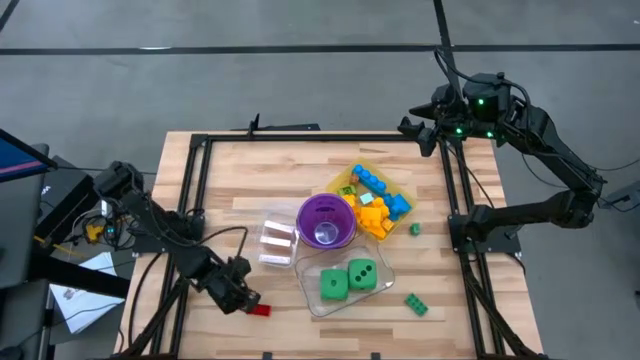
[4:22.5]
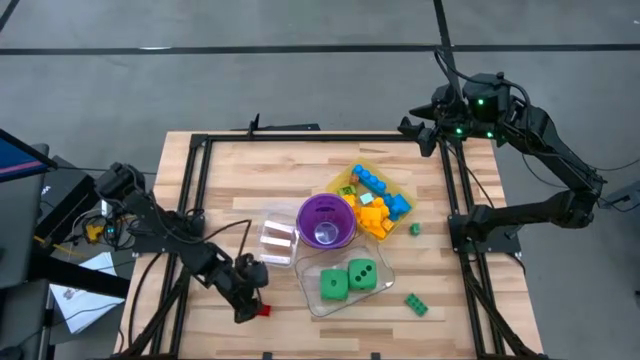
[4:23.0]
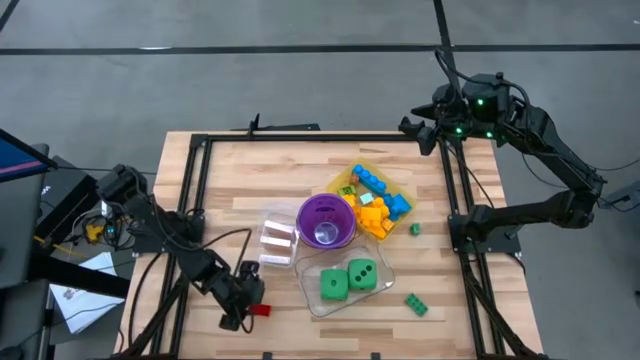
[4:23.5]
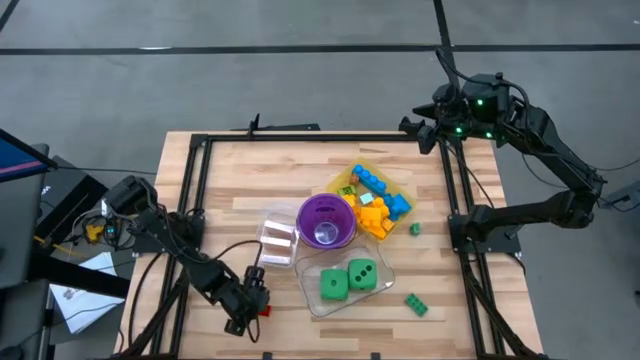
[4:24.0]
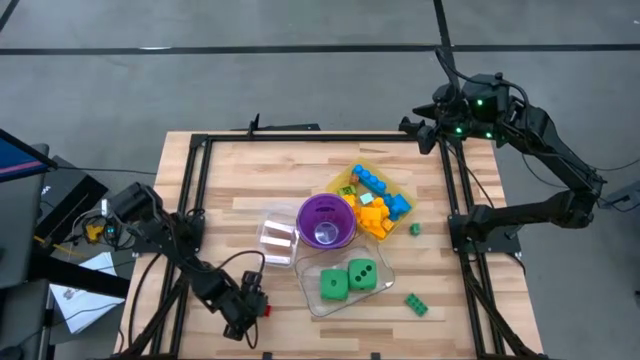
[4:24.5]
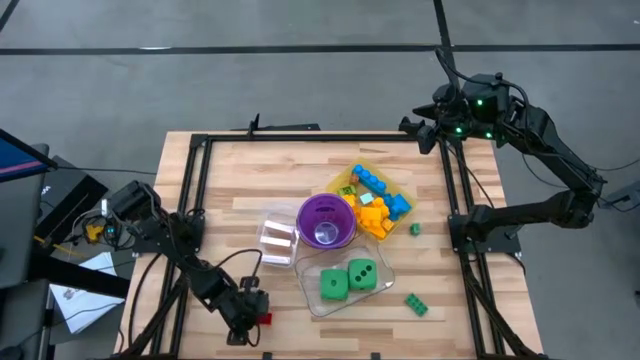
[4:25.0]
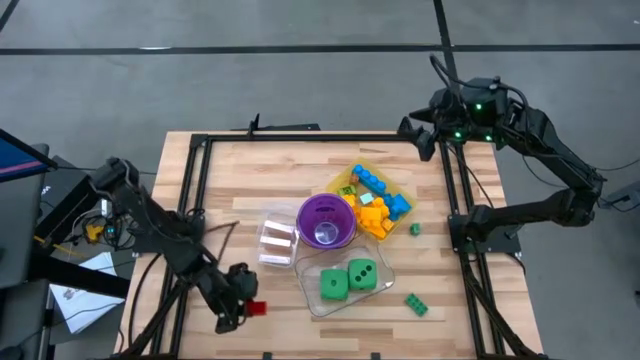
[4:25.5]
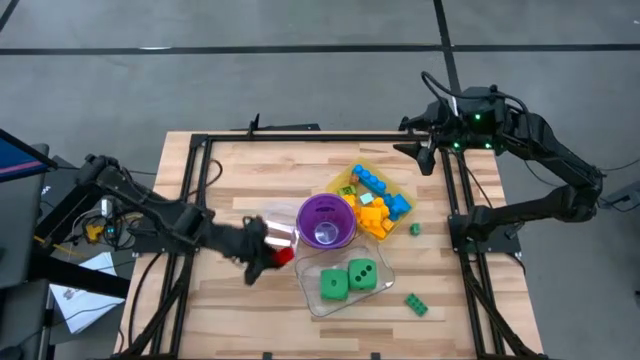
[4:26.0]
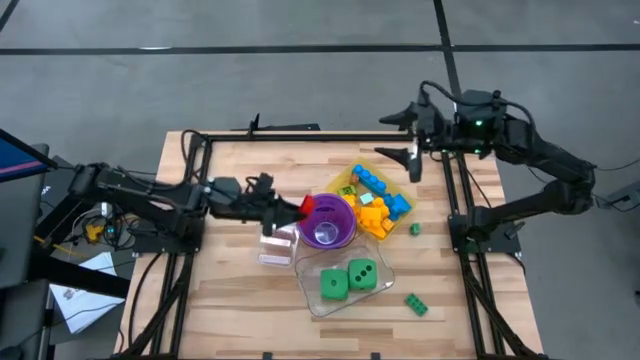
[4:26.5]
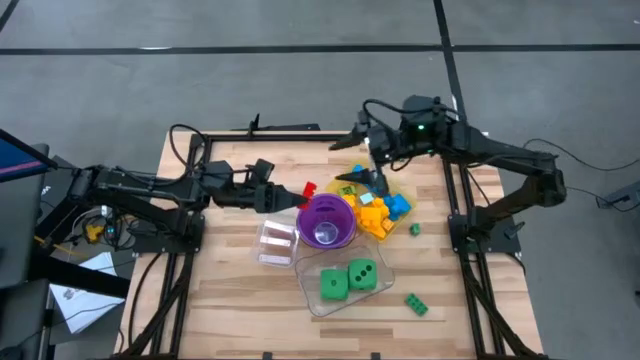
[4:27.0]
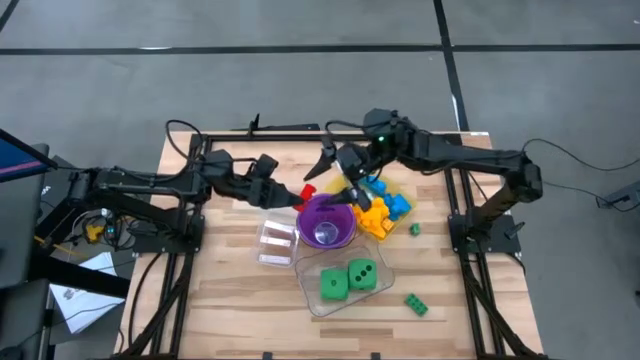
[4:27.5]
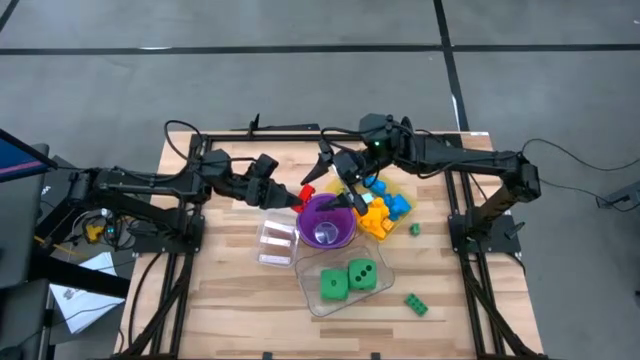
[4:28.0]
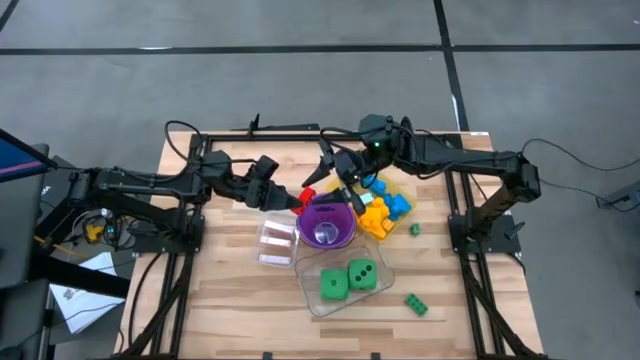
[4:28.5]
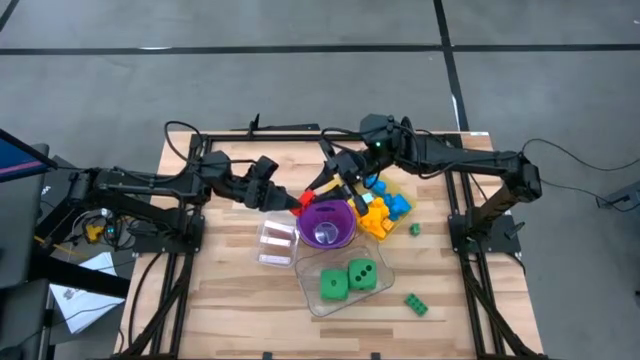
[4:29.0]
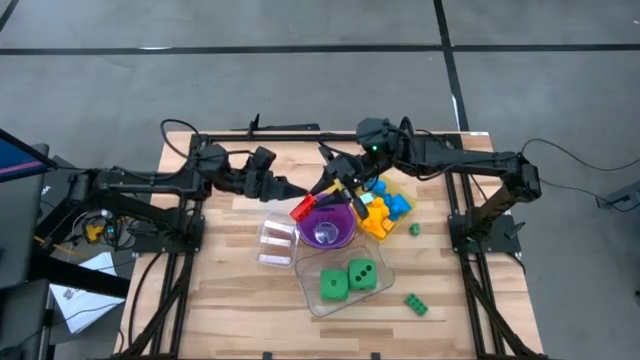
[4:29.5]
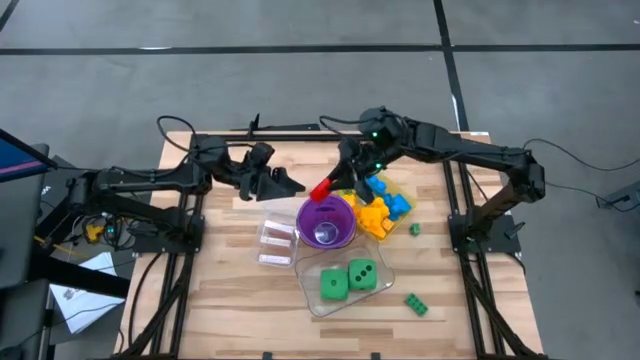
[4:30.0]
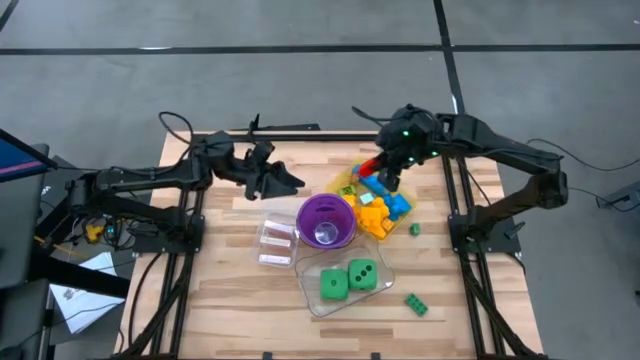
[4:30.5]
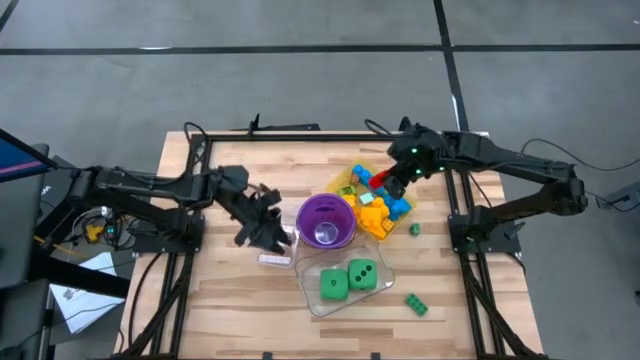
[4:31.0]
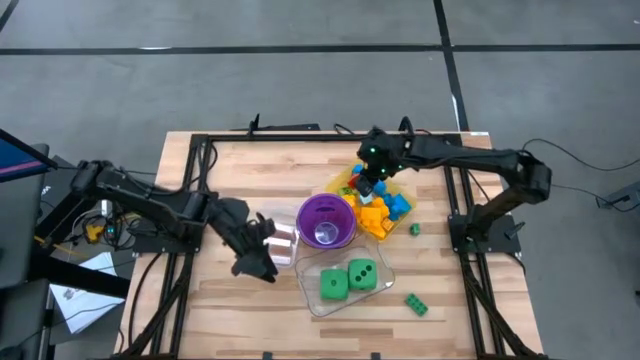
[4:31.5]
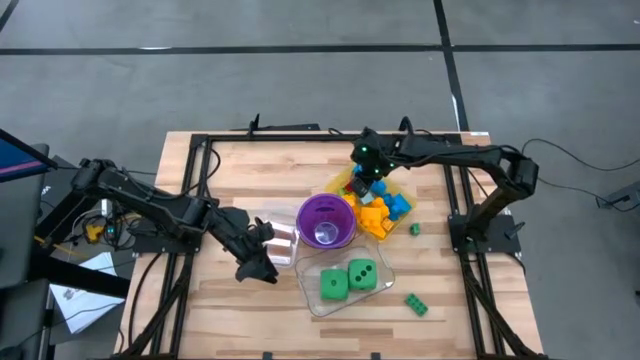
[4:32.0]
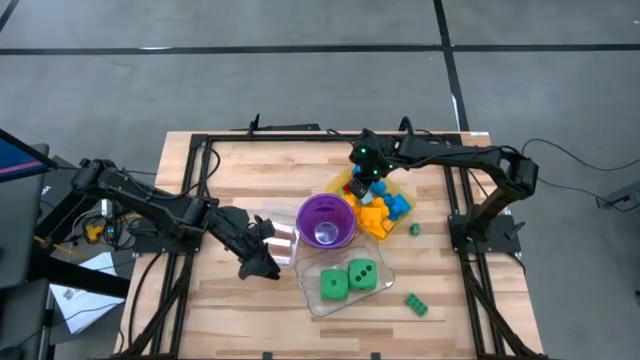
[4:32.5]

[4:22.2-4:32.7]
Task: Pick & Place Toys
Put the red game piece into the yellow bin

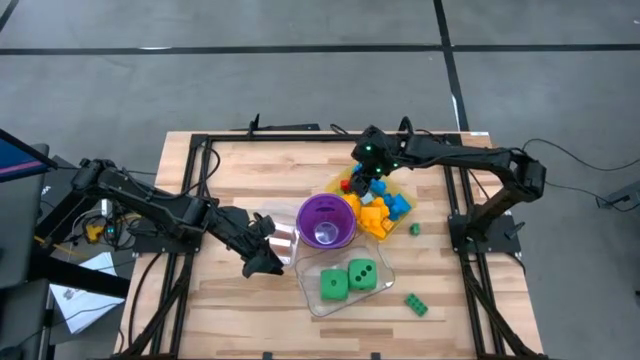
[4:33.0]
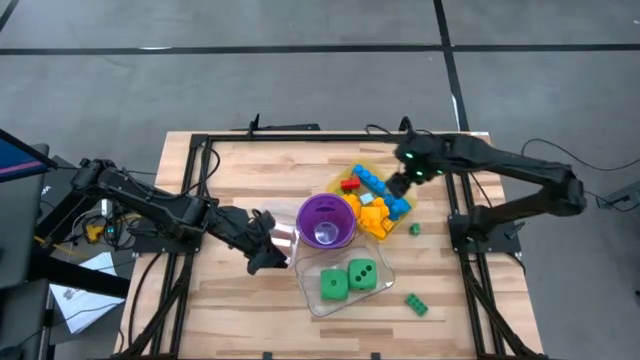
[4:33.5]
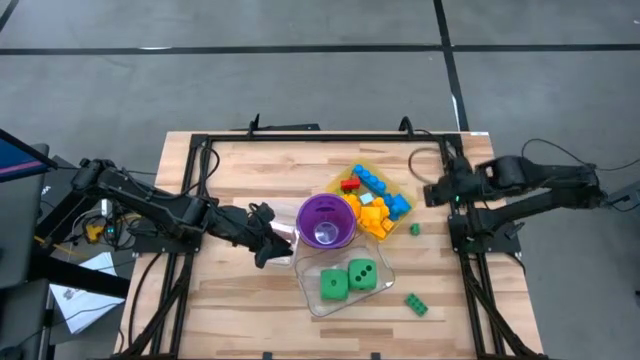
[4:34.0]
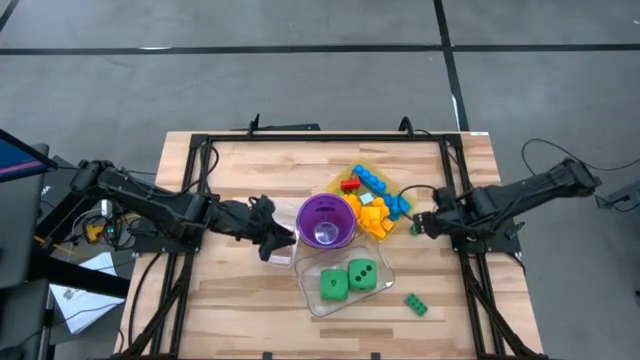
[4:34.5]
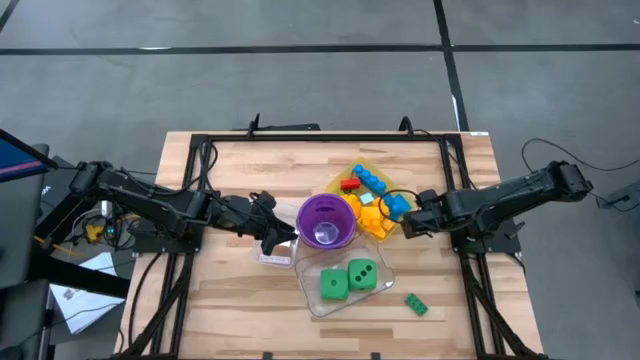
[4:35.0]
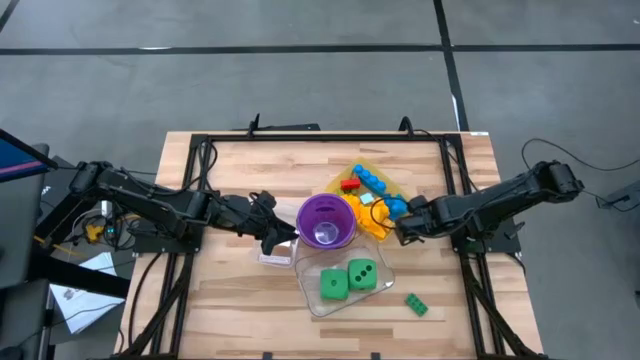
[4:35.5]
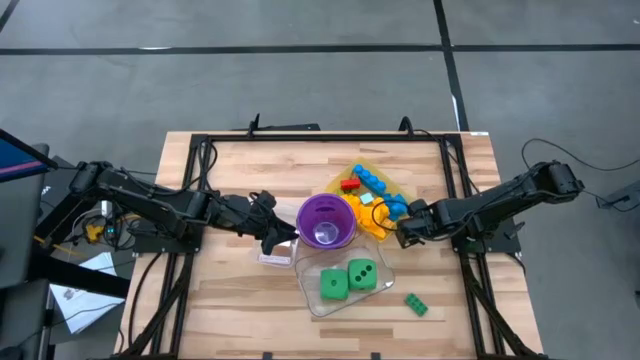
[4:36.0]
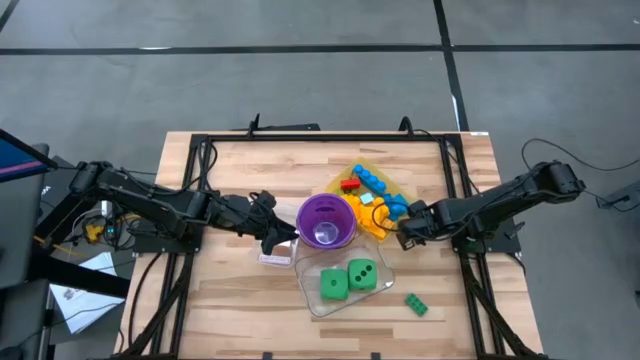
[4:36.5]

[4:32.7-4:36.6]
Put the green game piece into the yellow bin

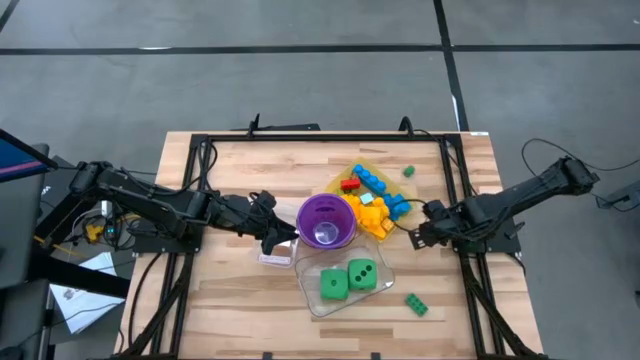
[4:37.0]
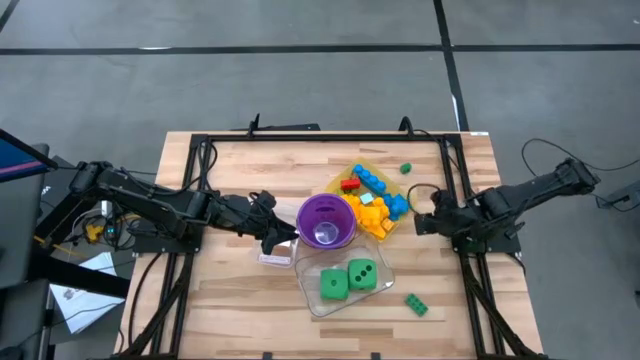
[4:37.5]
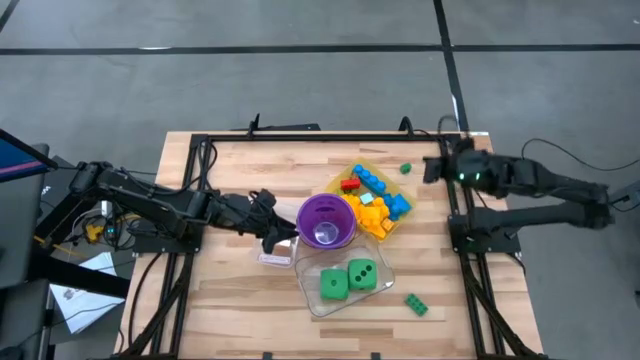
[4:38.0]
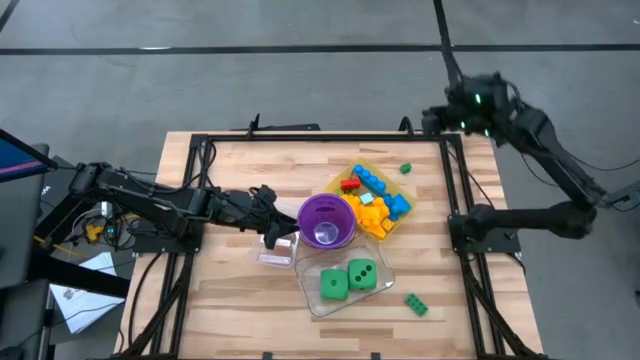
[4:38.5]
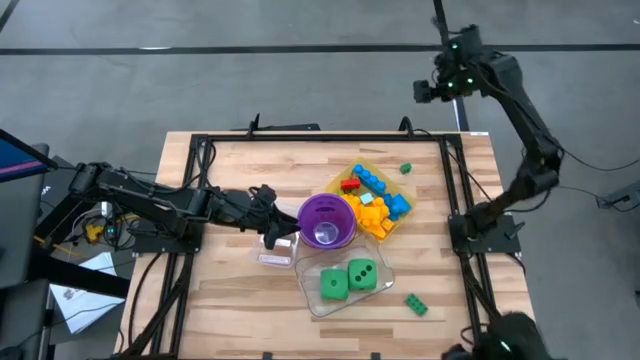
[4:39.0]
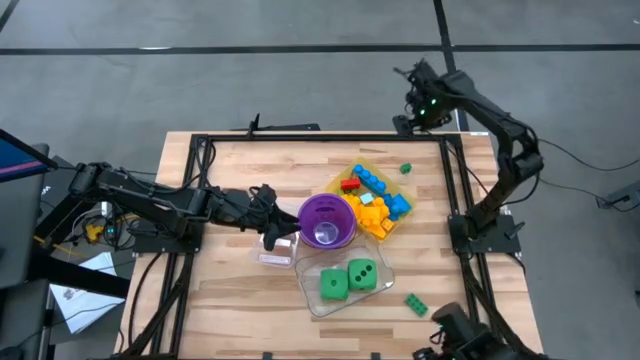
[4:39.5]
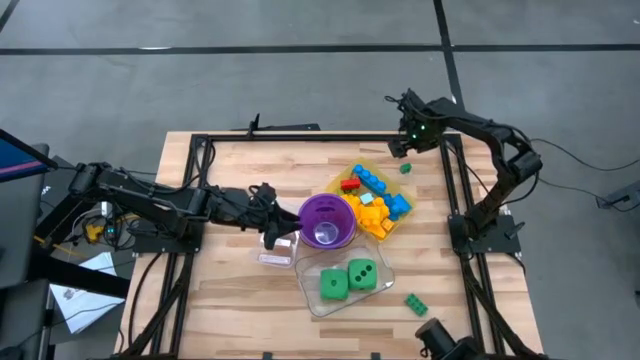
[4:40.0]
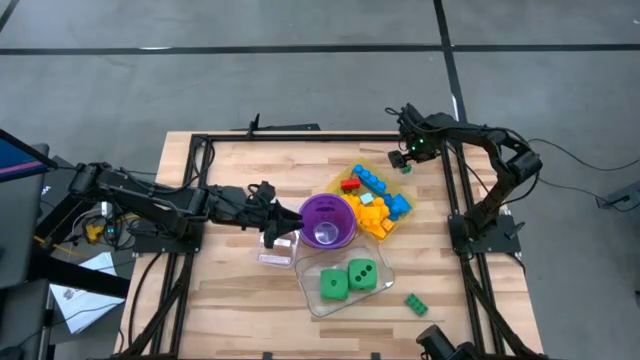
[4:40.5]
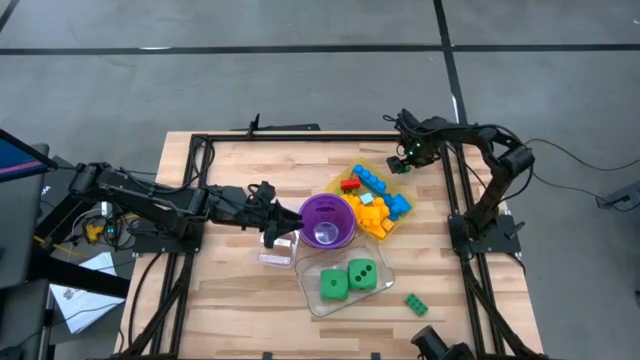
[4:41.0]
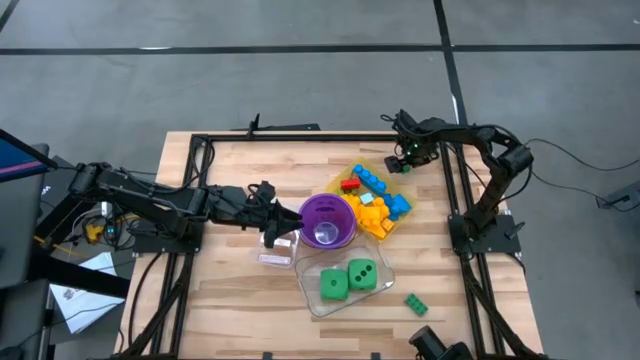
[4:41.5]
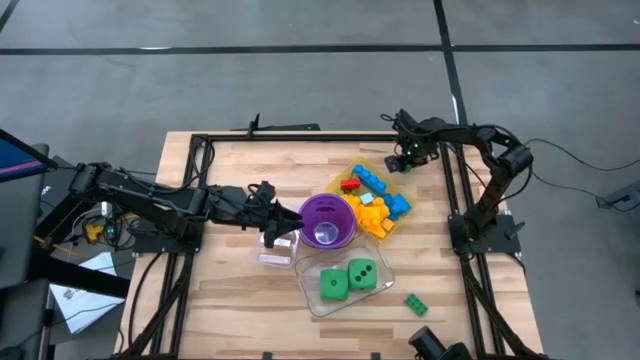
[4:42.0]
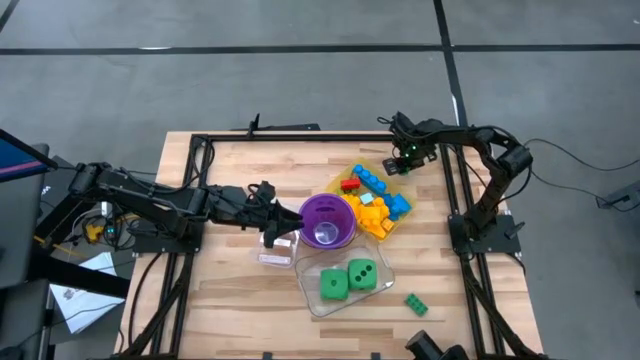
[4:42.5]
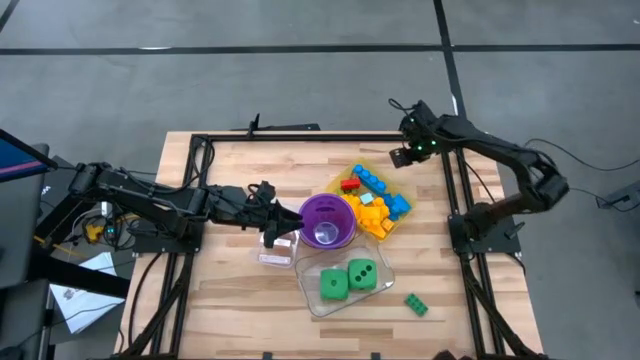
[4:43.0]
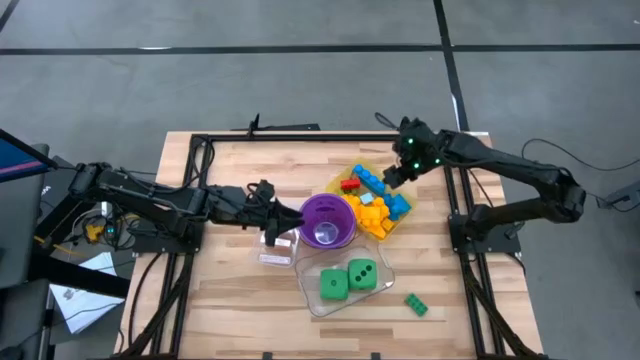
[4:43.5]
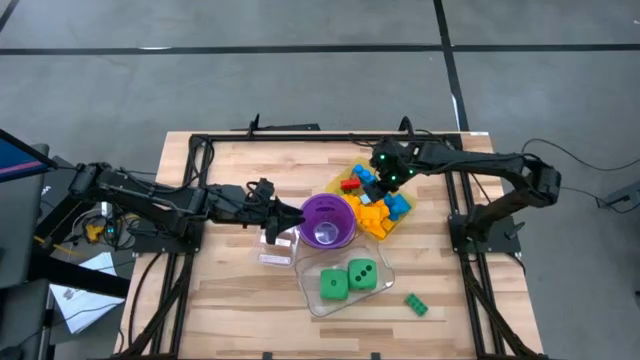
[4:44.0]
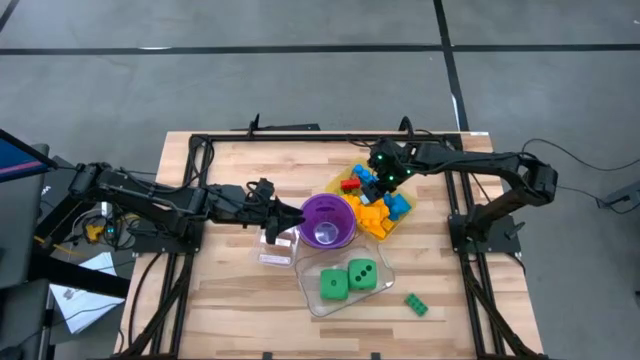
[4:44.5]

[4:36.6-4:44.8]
Put the green game piece into the yellow bin
